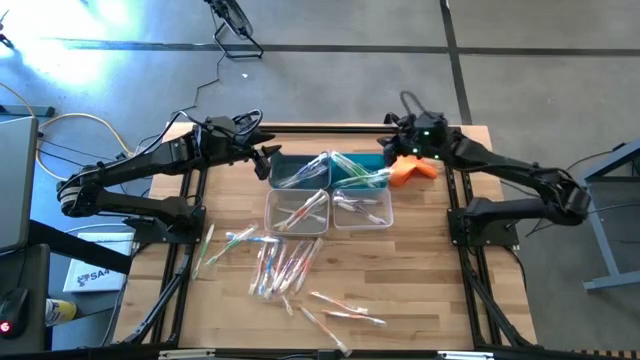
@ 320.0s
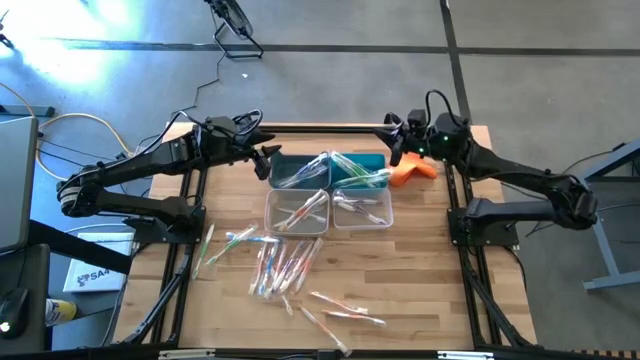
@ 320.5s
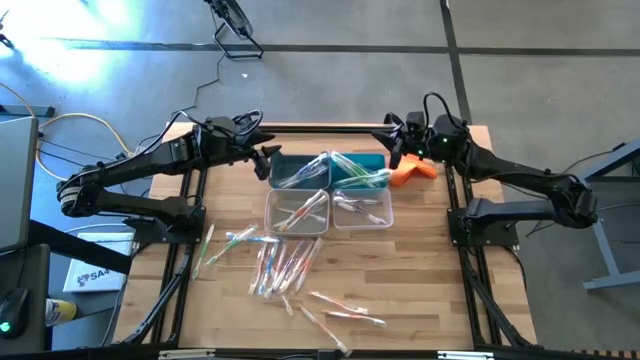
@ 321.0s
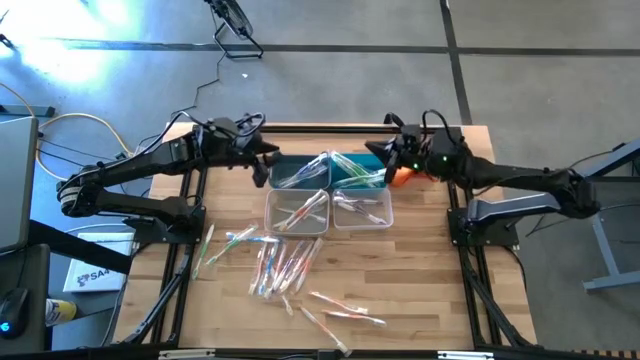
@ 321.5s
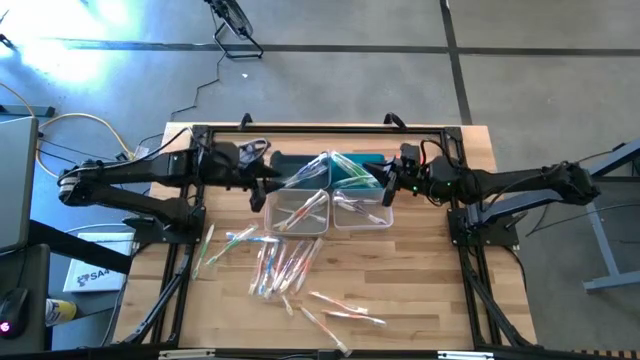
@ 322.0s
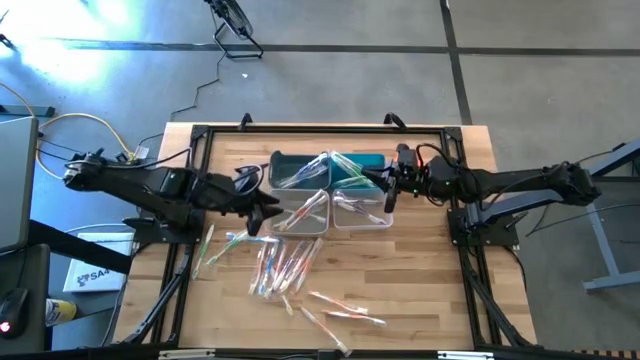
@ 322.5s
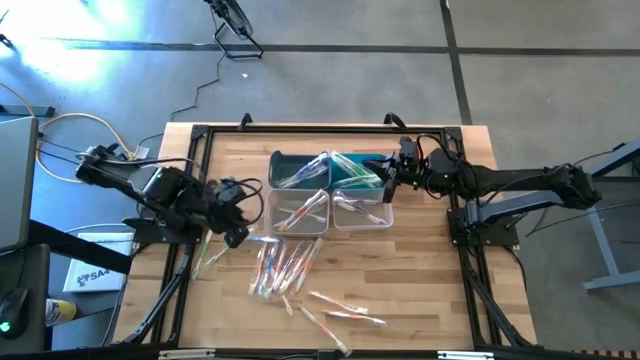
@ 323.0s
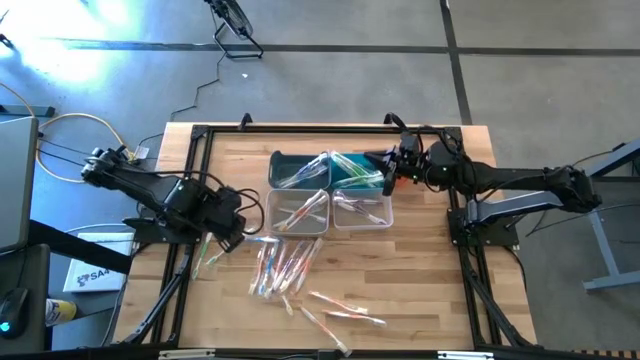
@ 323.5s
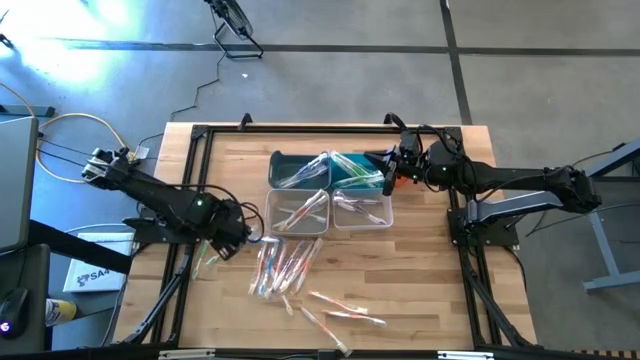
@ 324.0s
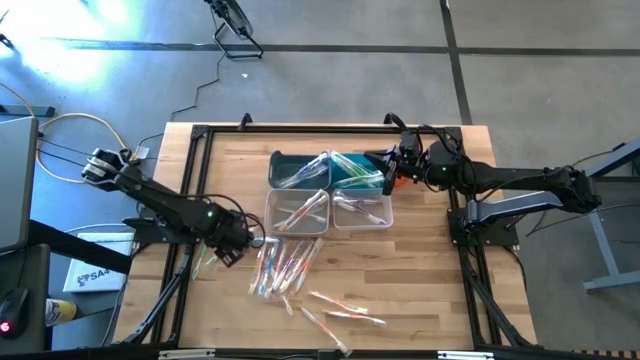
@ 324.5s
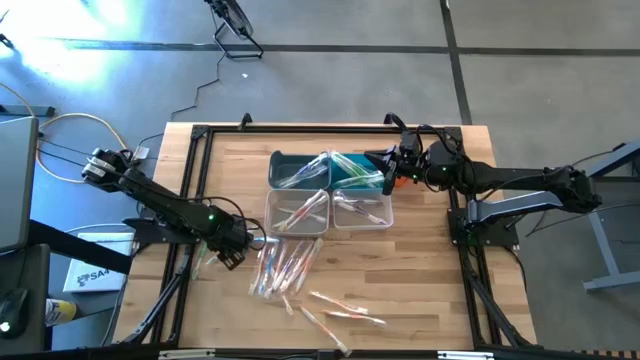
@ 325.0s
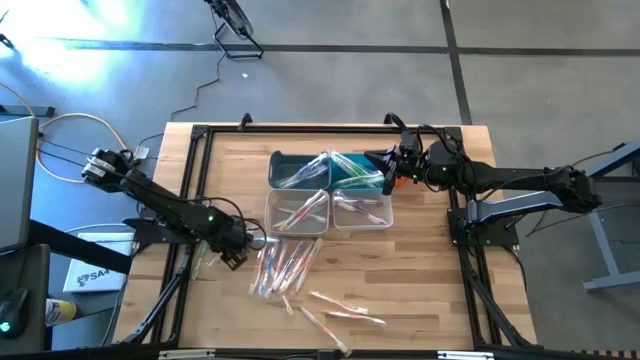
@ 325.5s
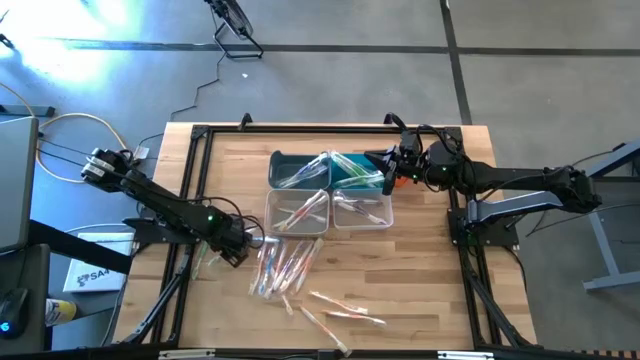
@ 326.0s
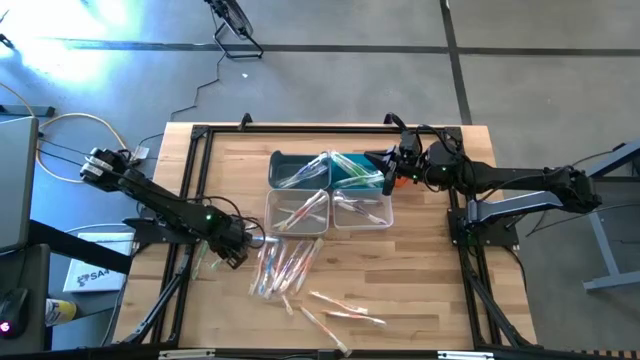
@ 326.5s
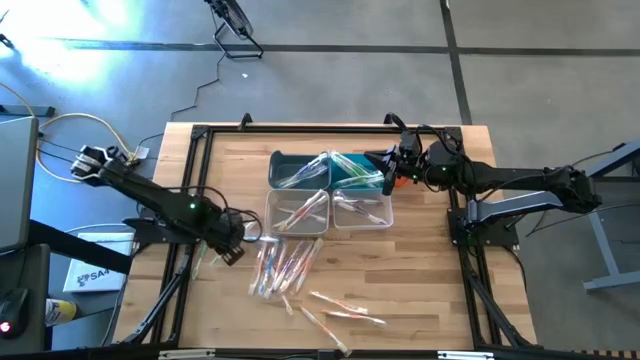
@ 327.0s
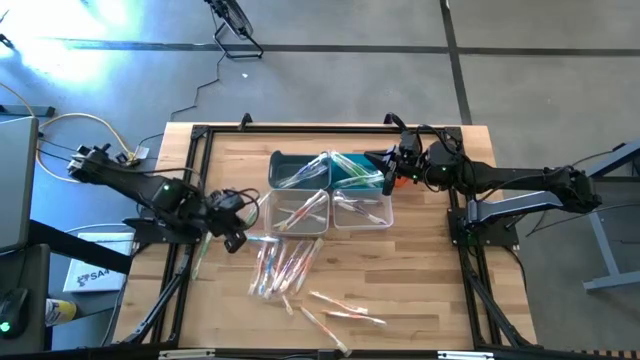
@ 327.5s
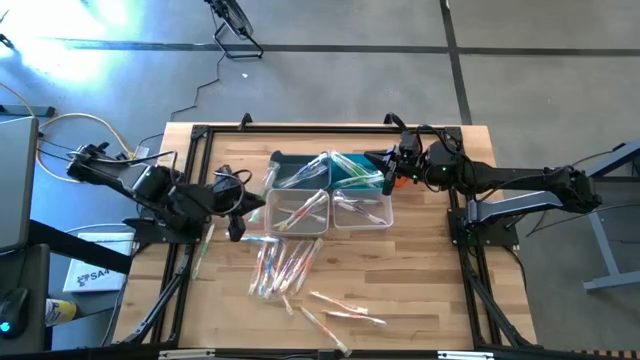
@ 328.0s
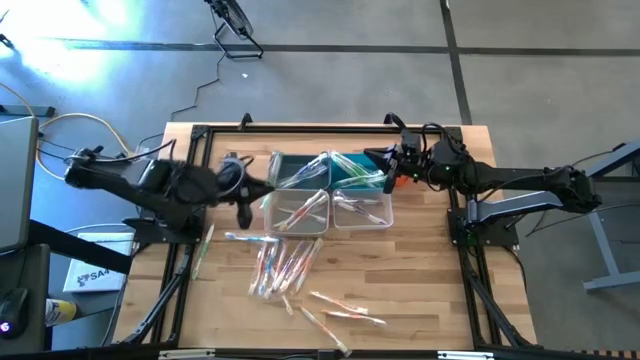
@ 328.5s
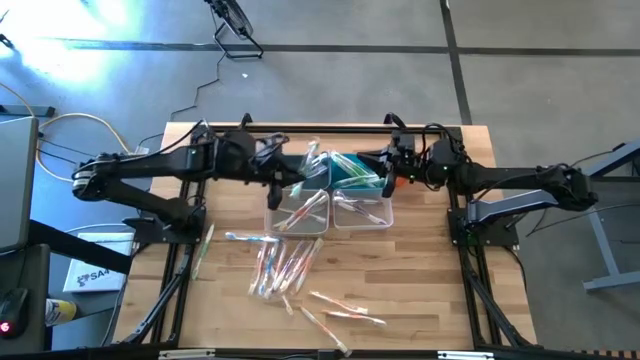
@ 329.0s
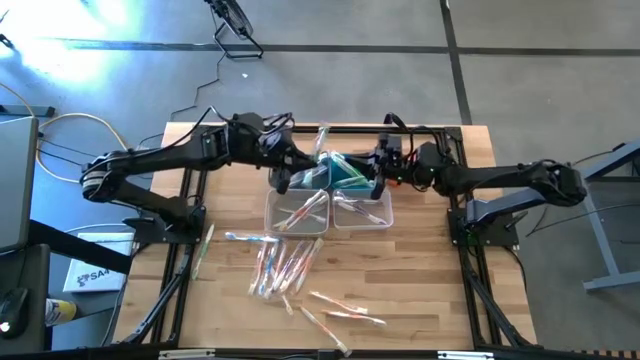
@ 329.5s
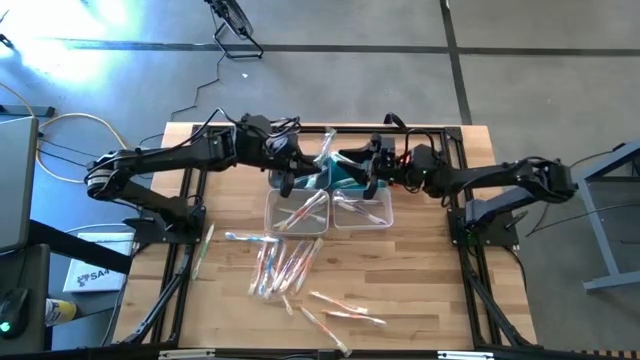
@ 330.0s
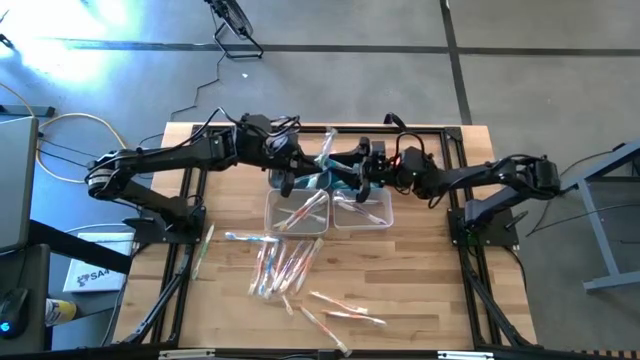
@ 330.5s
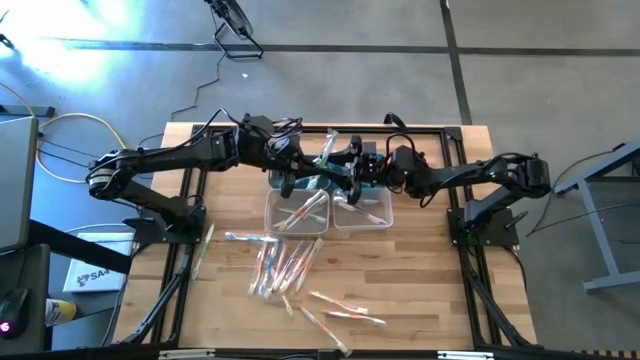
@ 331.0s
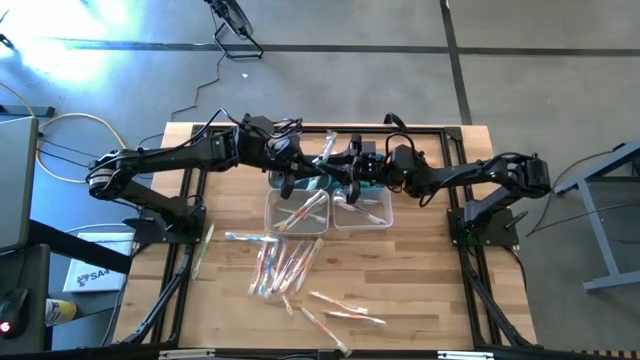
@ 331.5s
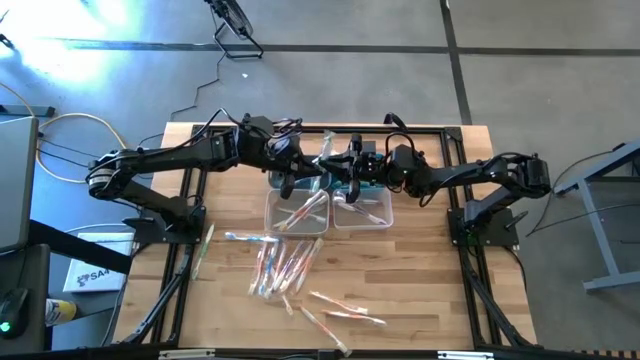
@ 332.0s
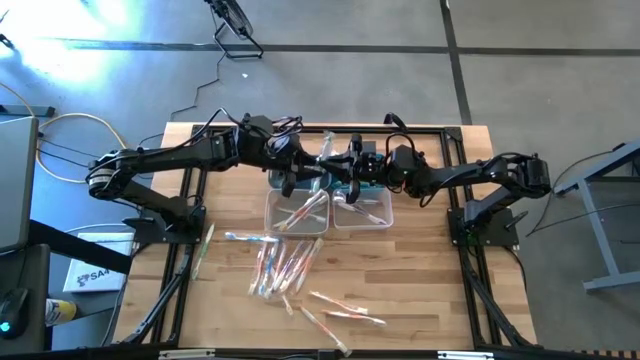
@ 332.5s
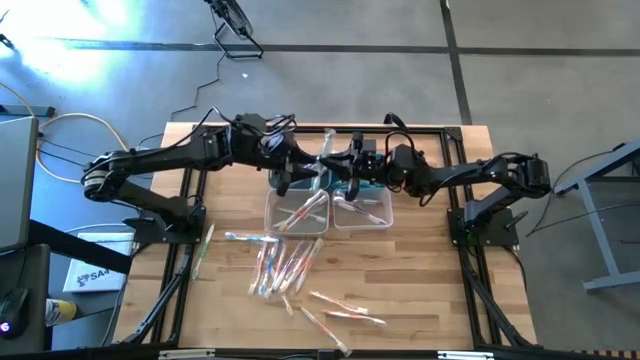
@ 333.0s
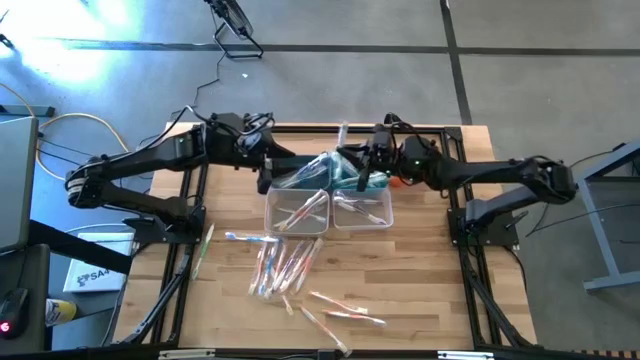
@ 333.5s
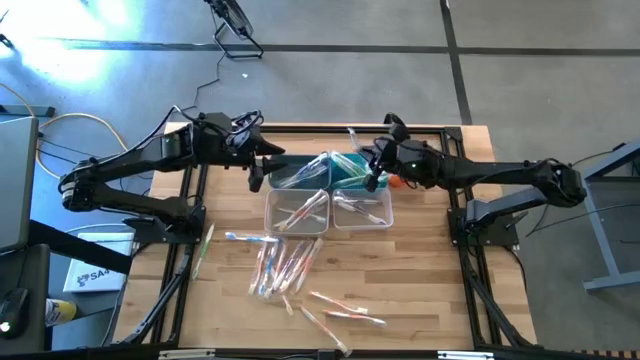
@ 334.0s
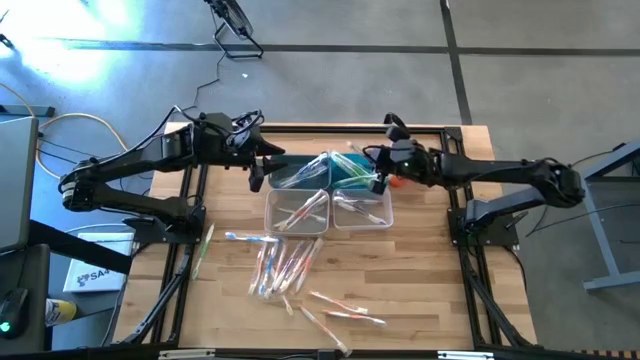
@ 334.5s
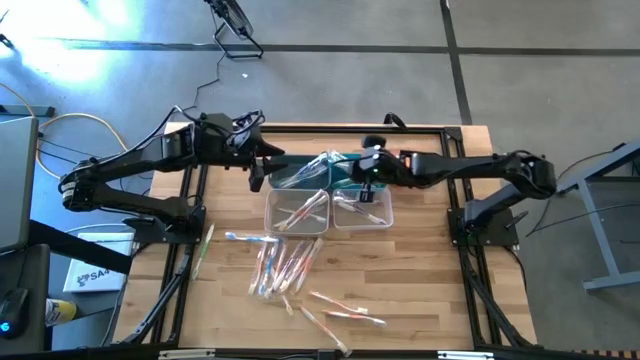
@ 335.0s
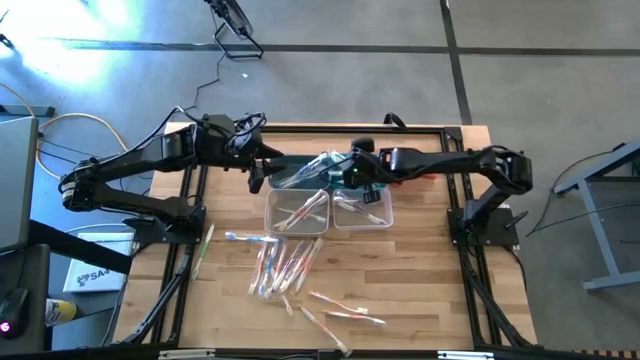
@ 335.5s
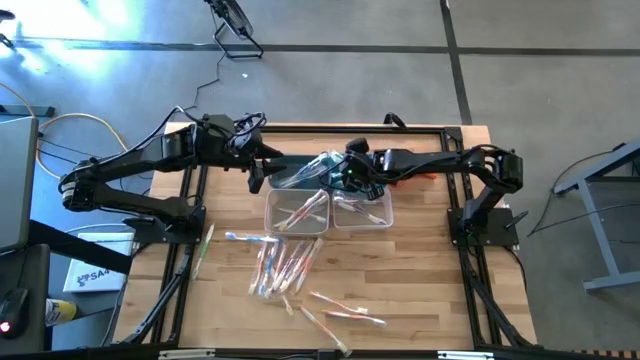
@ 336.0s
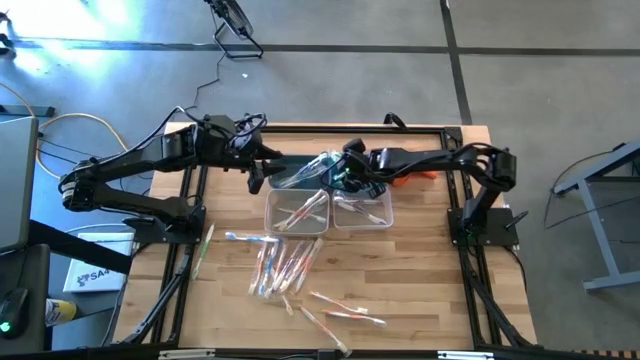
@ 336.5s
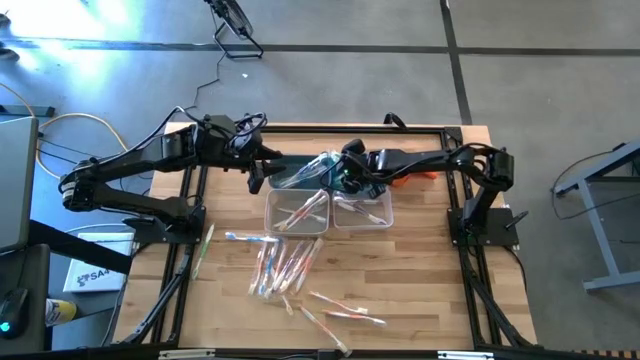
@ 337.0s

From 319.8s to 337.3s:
Task: Pick & Place Toothbrushes
Put the green toothbrush into the blue bin

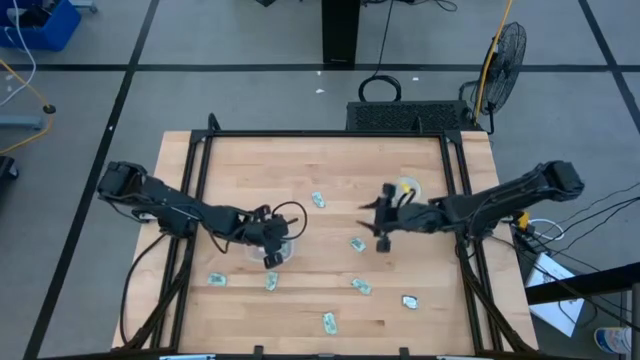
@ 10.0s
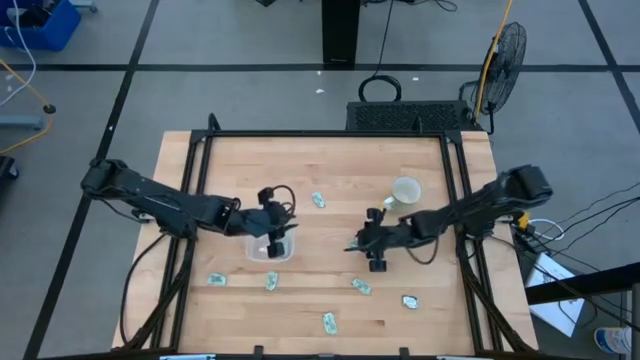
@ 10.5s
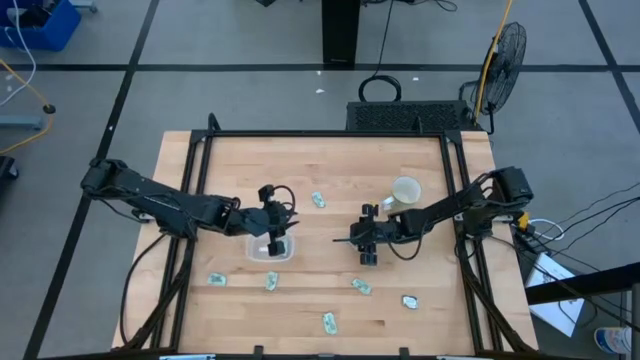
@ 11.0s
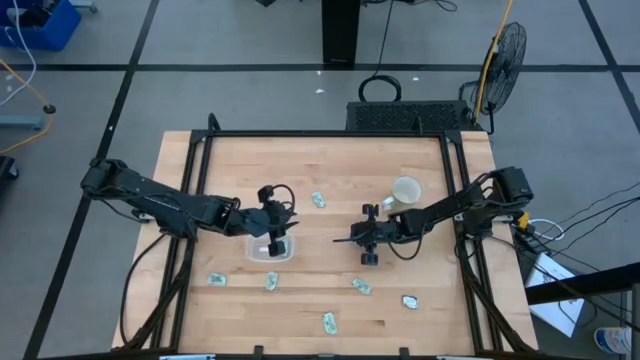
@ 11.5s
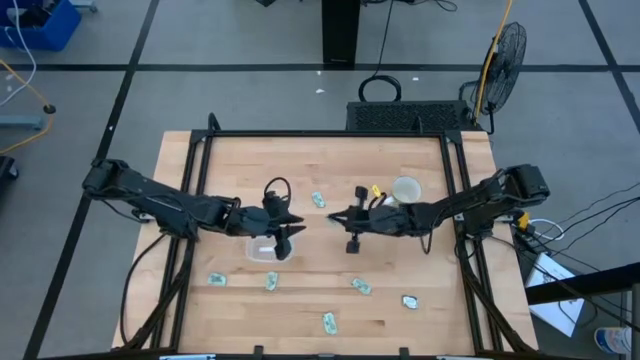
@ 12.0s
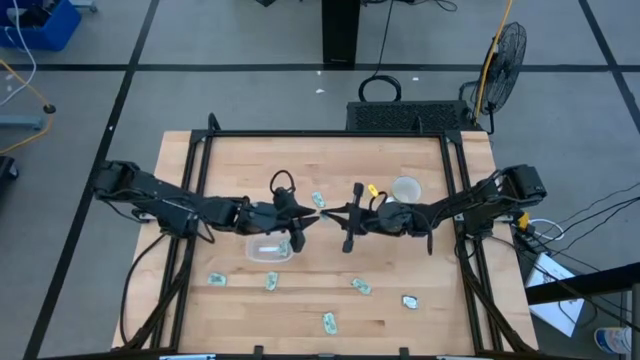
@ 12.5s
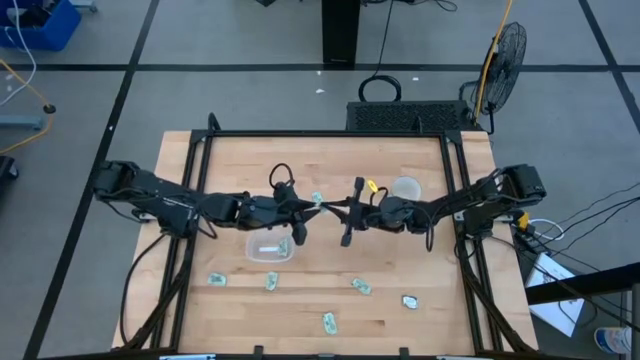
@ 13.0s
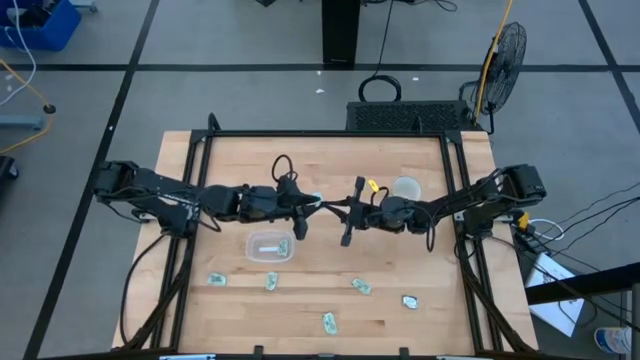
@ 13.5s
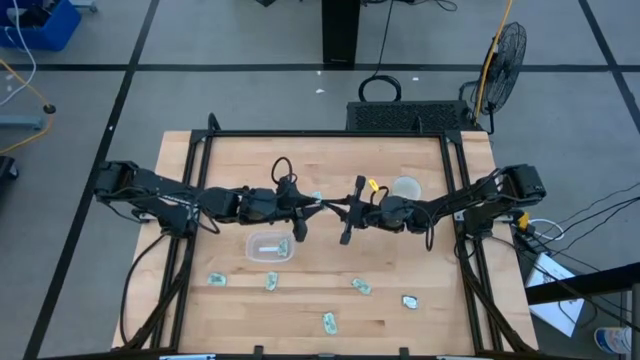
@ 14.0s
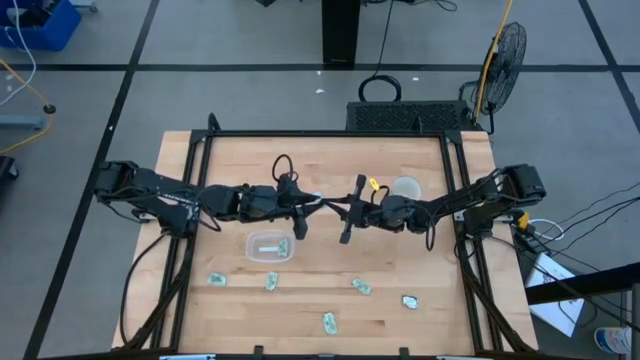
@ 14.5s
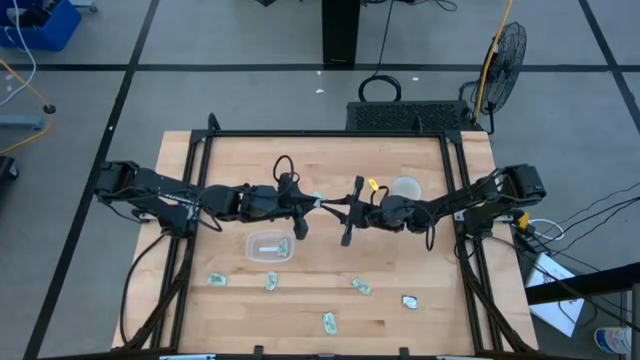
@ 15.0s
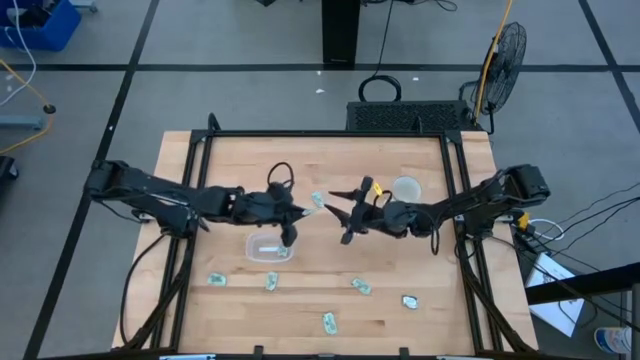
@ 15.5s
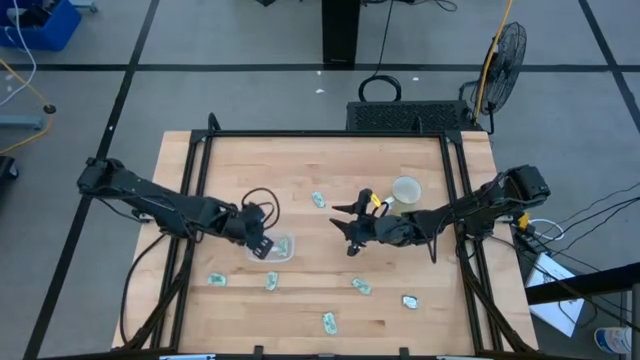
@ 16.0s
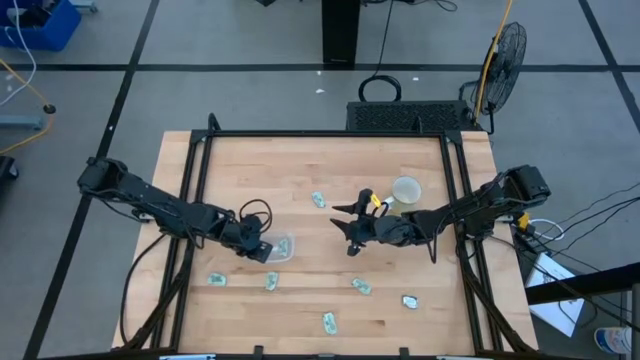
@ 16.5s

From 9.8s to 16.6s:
Task: Pick and place Stevia / Truvia into bins
Put the stevia packet into the transparent bin
